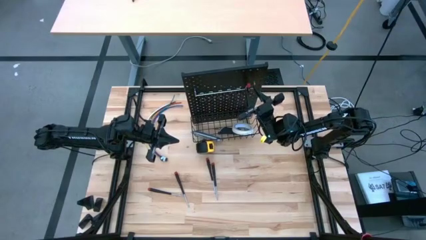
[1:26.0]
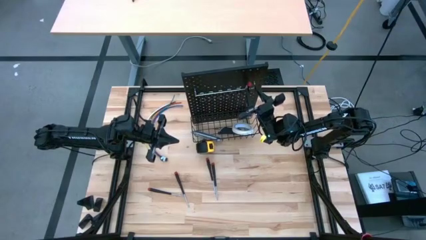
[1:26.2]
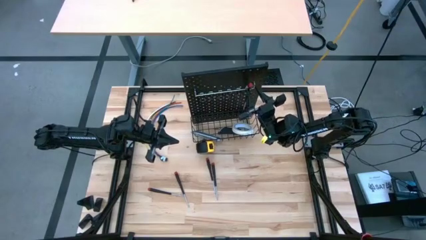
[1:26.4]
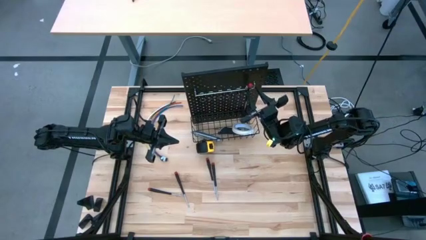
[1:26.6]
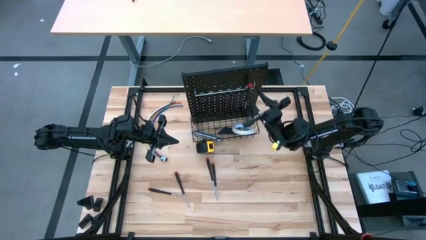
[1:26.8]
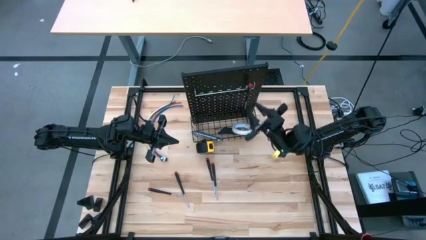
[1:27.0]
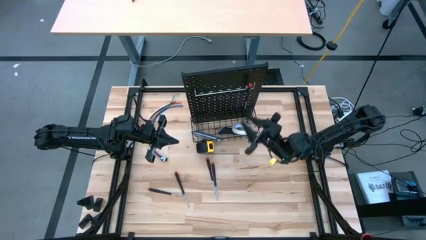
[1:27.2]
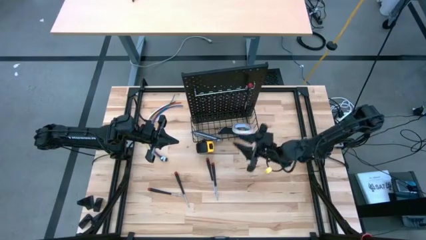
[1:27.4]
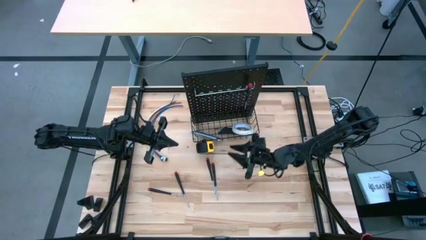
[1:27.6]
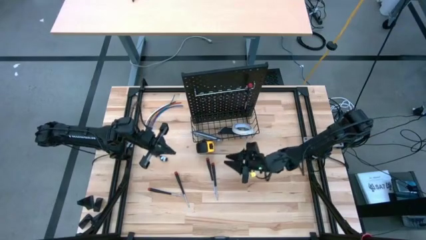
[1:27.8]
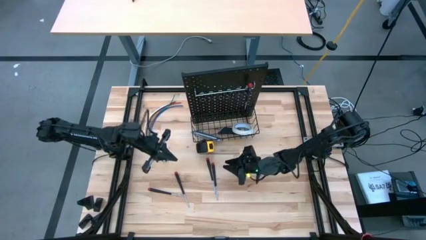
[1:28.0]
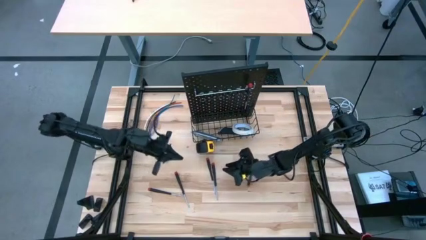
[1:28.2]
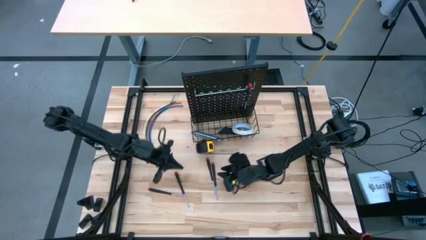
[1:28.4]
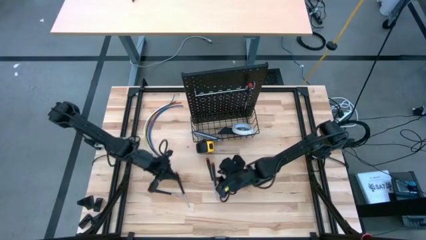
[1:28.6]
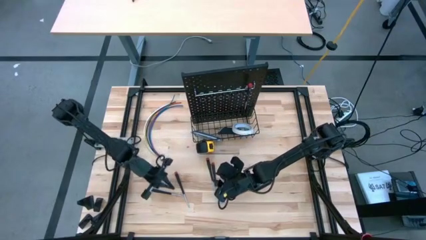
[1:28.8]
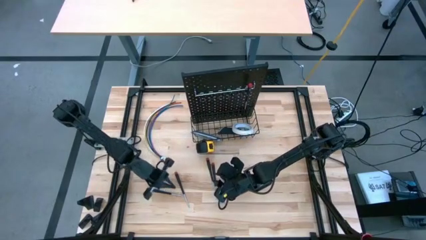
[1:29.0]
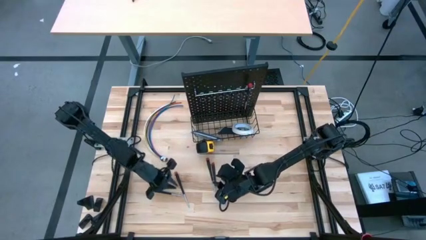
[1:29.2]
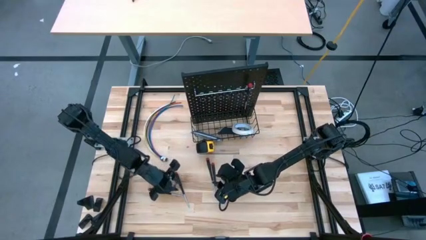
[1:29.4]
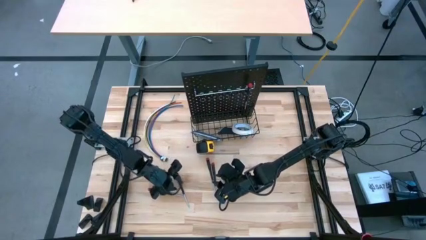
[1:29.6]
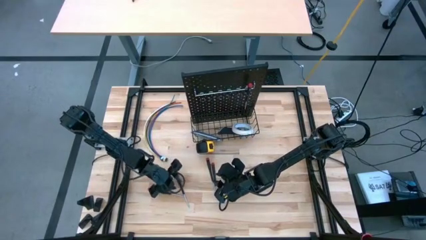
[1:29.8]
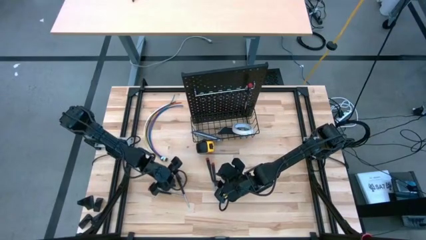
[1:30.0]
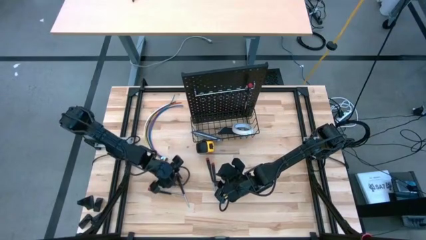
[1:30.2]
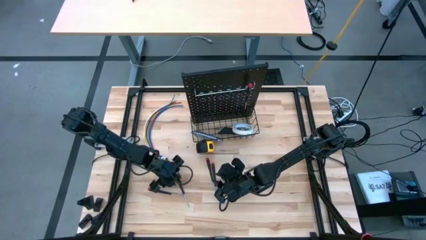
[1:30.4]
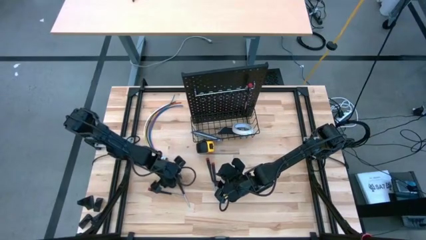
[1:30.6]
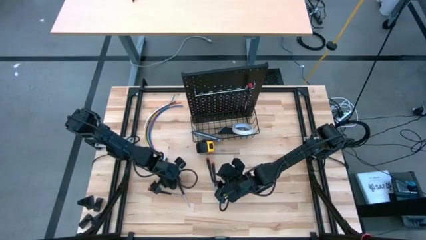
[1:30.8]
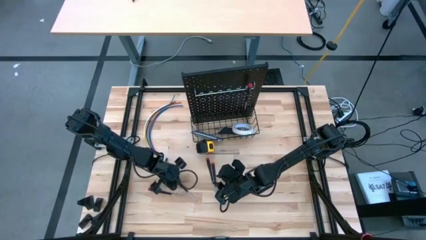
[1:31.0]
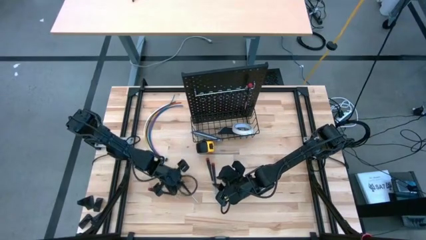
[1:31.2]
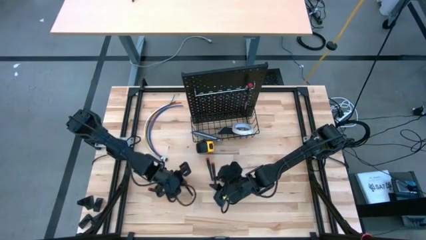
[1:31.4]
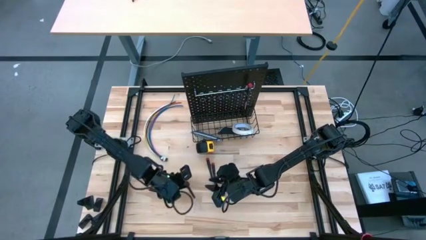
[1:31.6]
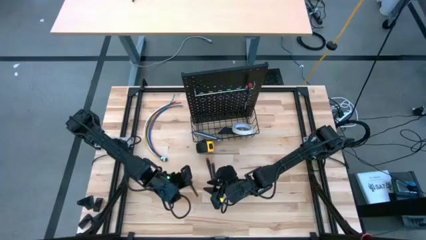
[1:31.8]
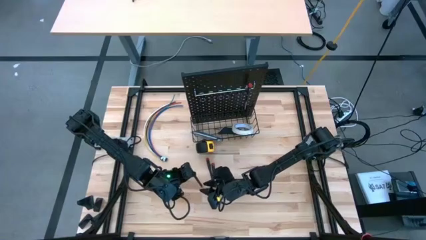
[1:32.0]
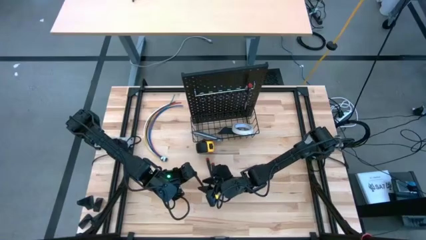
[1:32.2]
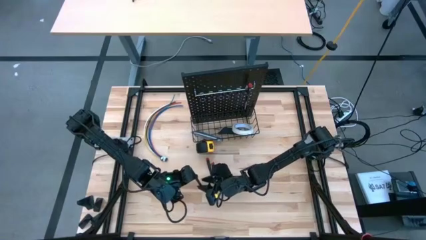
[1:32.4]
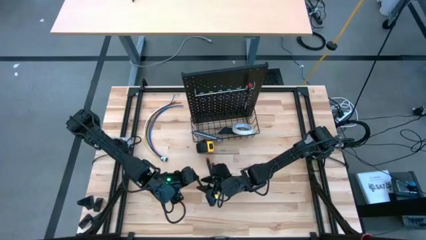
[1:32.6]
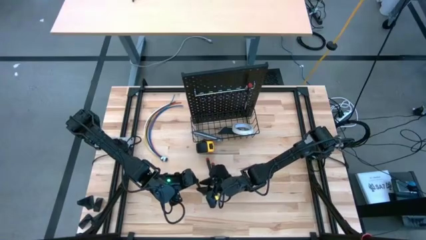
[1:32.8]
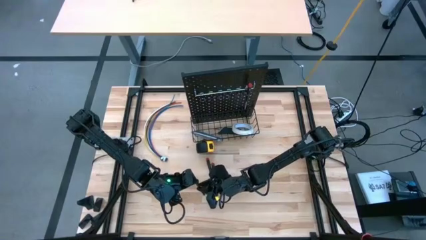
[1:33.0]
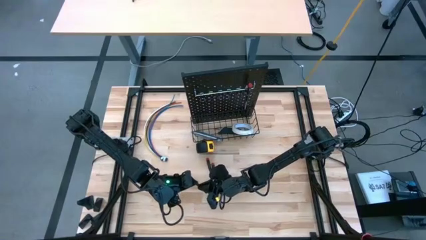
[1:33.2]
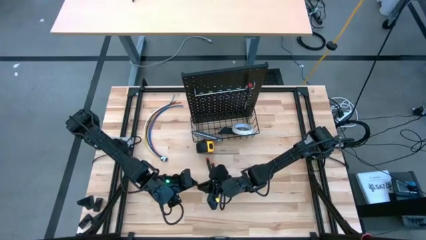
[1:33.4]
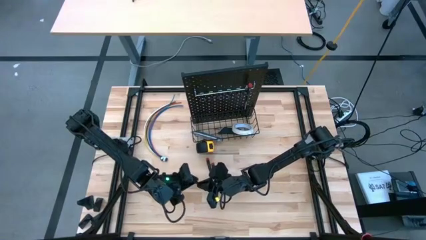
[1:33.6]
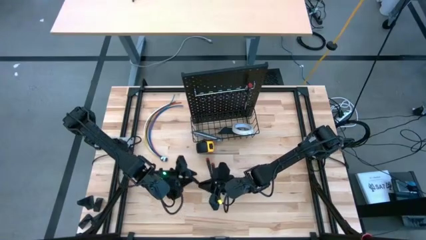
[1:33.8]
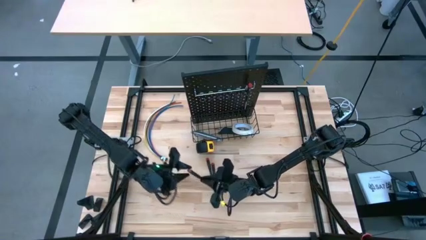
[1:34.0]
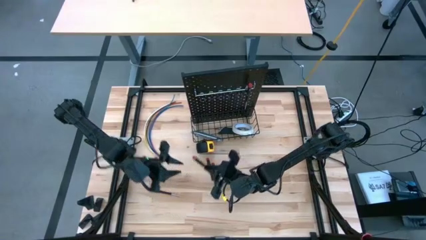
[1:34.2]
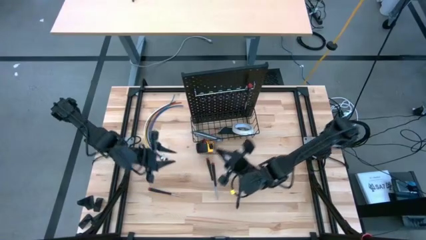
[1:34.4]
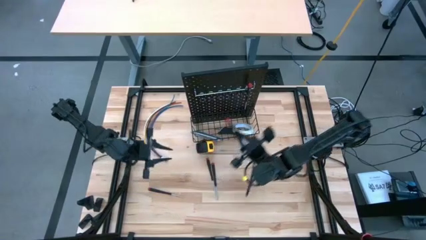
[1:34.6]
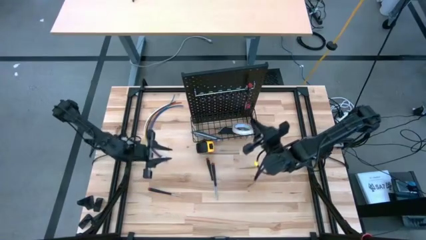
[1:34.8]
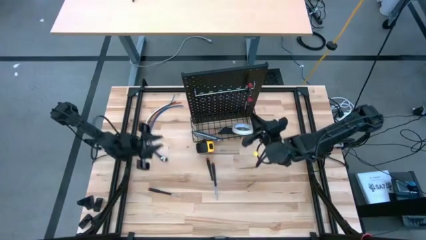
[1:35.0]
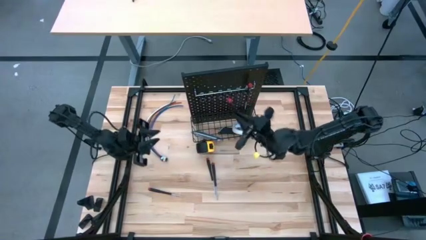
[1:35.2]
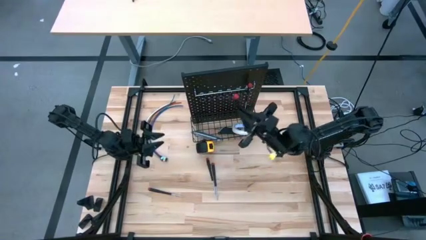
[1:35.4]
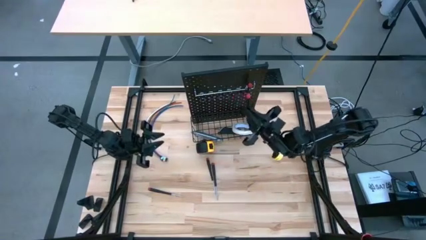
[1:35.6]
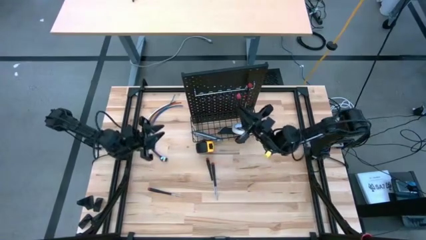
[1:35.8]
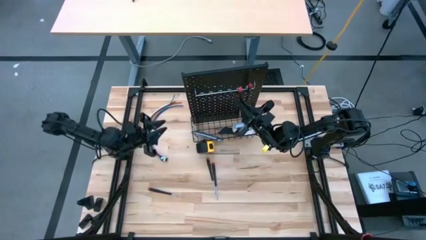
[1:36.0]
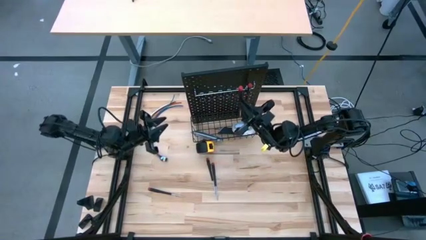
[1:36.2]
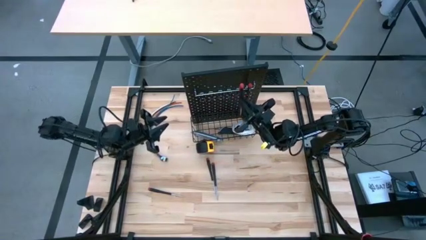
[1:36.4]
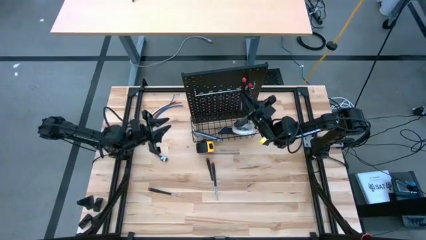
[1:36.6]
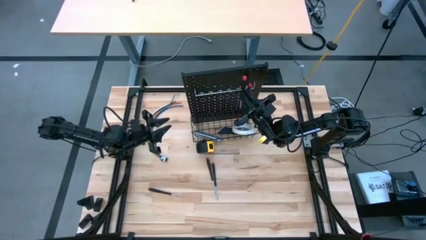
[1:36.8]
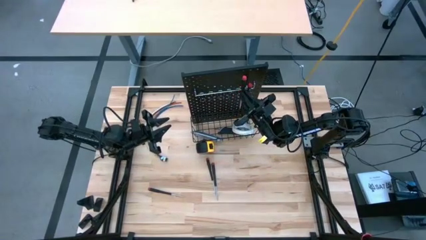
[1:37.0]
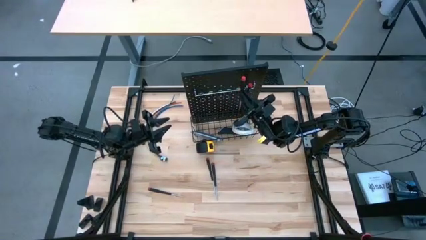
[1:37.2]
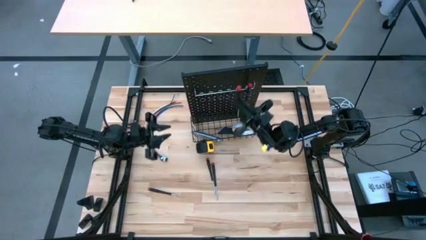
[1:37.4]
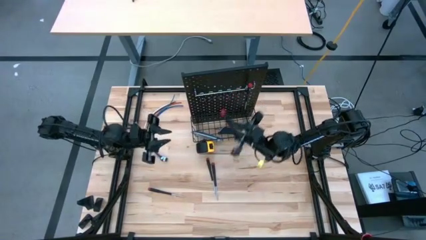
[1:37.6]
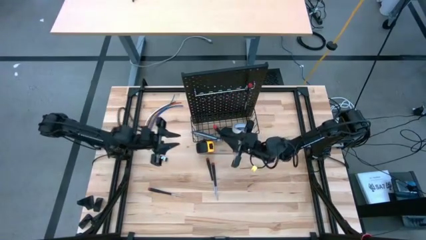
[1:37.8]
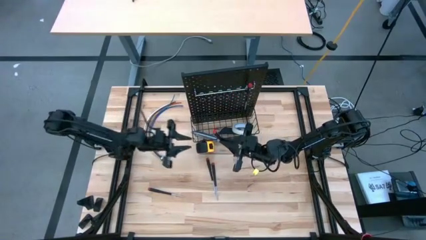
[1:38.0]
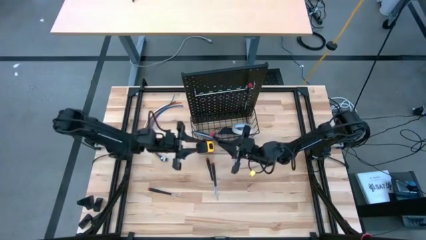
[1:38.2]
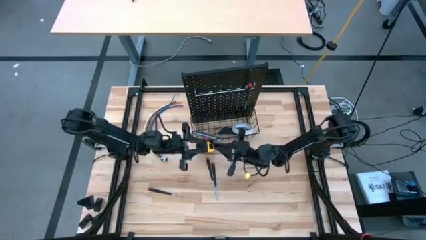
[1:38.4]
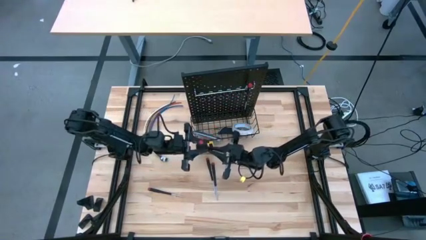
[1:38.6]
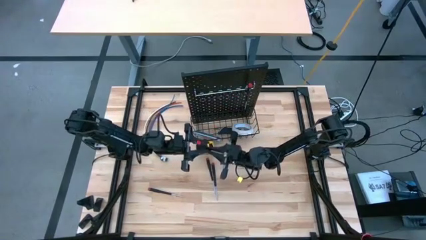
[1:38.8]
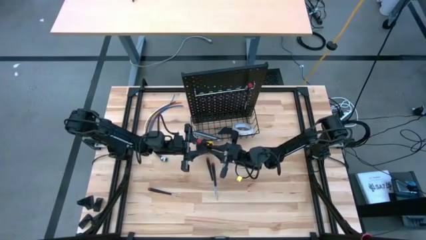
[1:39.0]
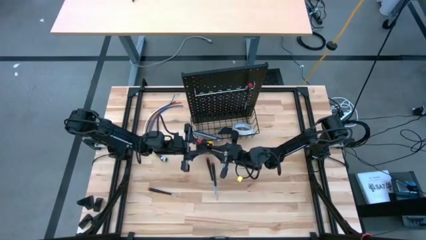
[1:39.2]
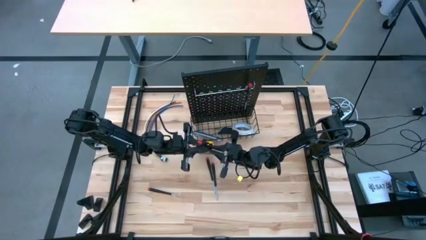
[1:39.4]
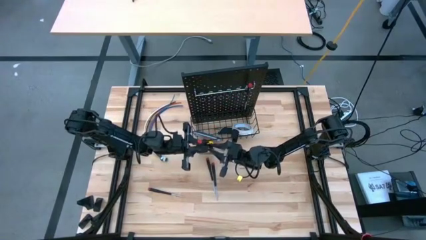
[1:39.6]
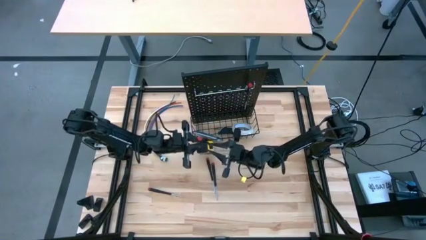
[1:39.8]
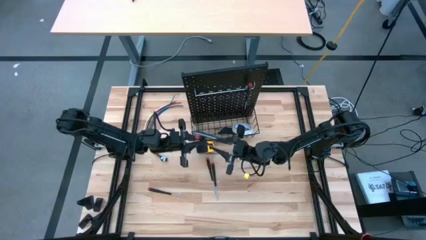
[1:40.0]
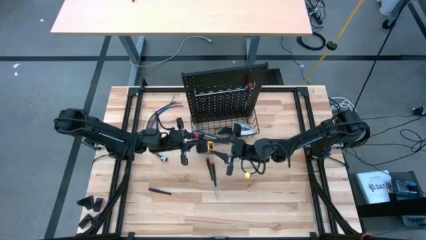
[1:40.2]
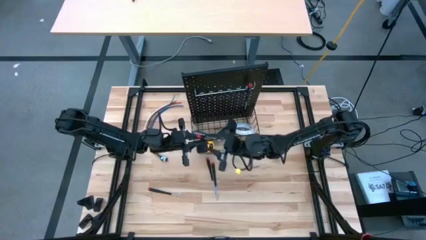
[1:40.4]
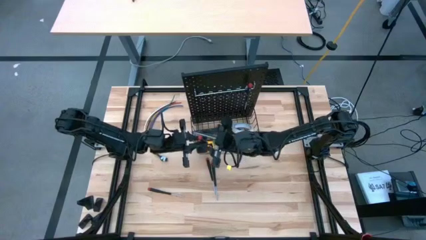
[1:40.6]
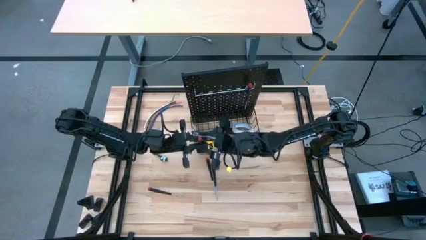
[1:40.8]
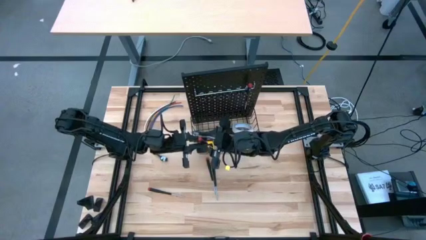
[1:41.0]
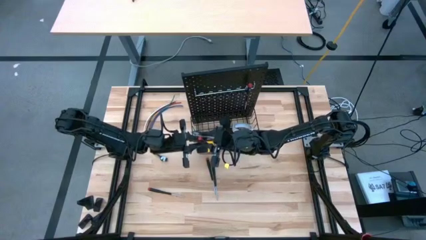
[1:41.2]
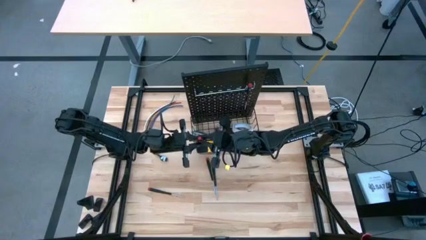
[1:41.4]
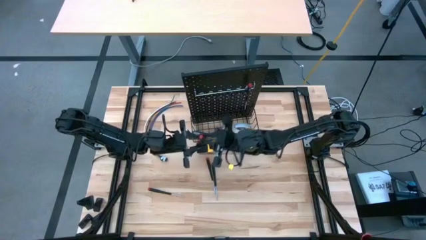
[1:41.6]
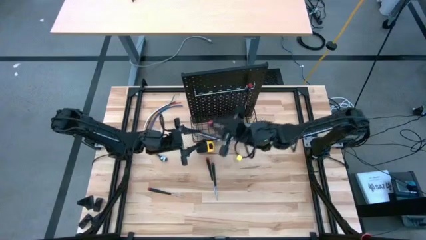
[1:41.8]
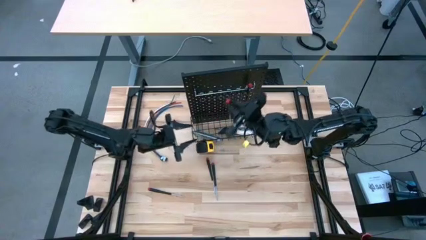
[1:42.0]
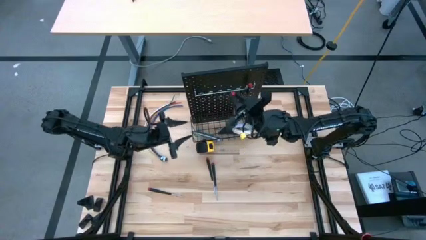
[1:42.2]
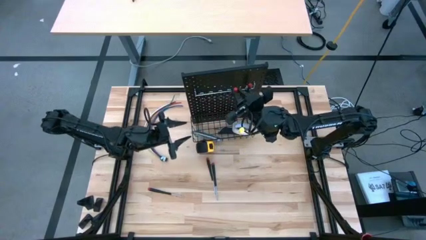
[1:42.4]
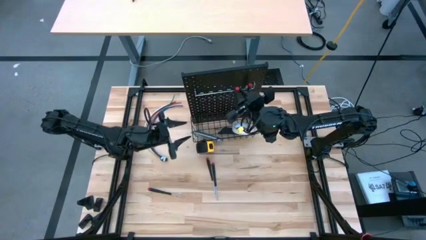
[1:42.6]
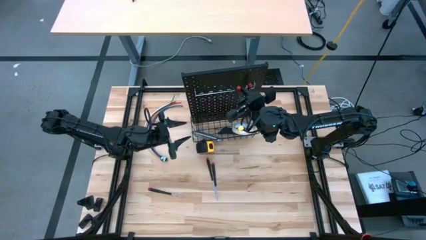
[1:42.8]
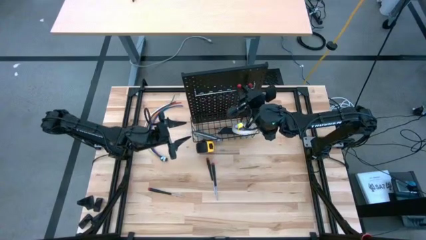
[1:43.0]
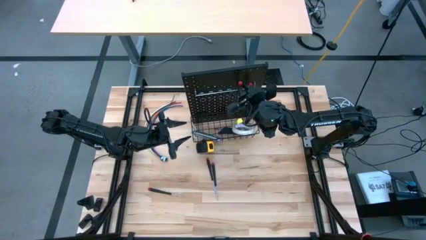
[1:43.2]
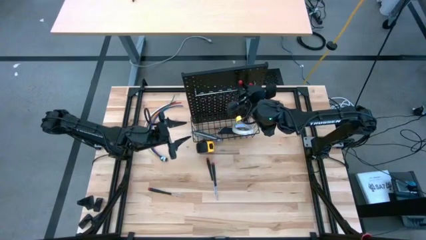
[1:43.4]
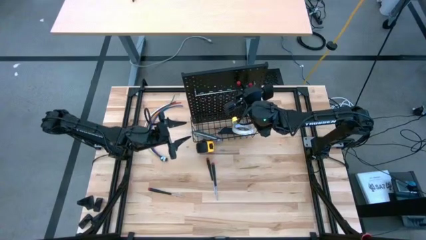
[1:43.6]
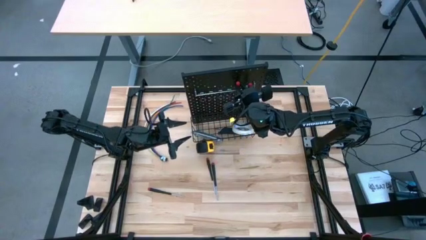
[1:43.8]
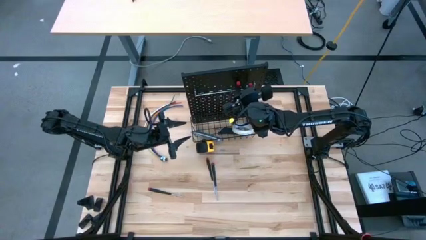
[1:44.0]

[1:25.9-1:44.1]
Task: Hang tools onto peg board
Hang the black screwdriver onto the pegboard
